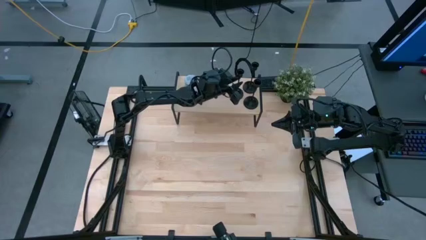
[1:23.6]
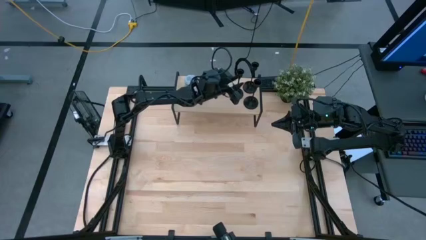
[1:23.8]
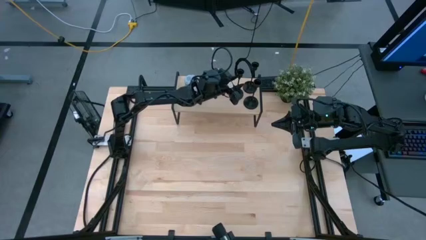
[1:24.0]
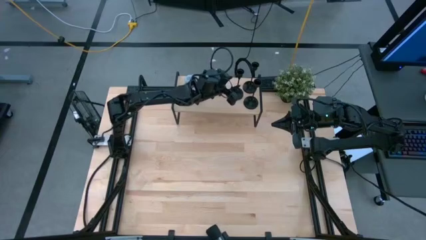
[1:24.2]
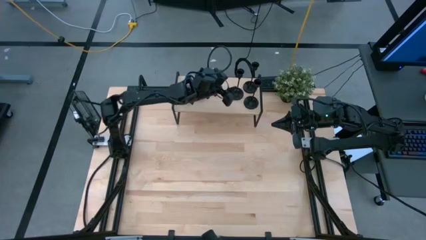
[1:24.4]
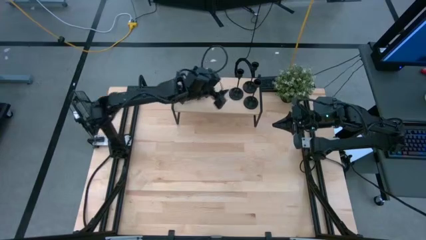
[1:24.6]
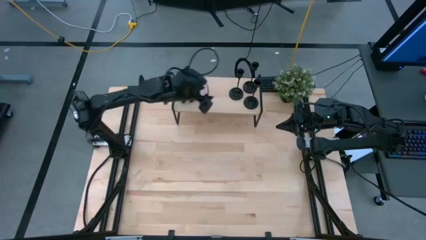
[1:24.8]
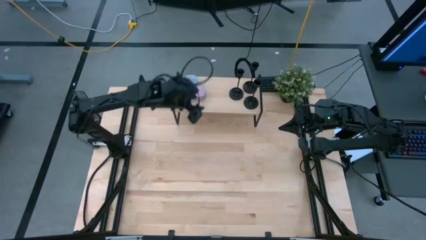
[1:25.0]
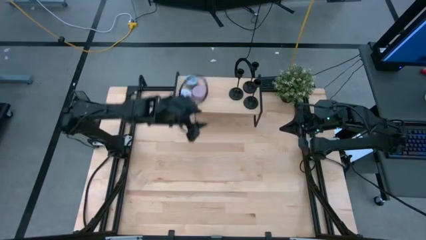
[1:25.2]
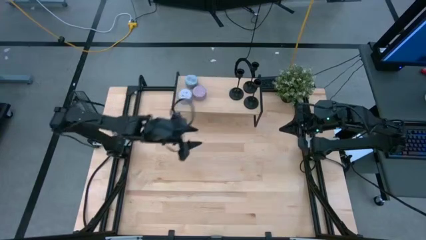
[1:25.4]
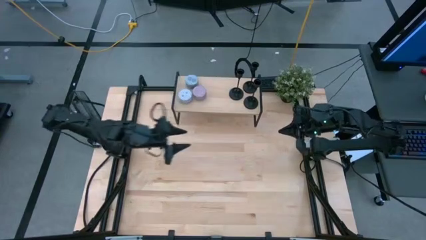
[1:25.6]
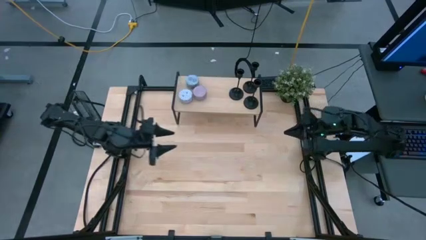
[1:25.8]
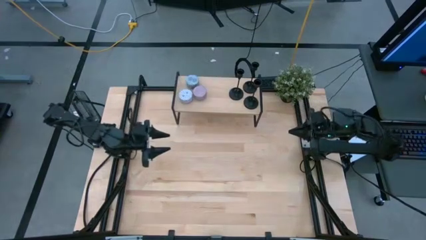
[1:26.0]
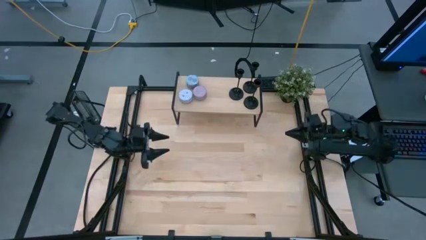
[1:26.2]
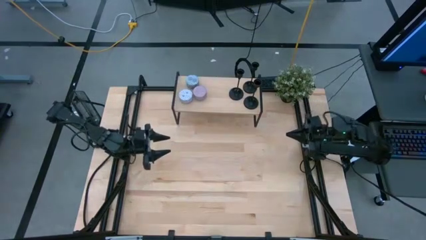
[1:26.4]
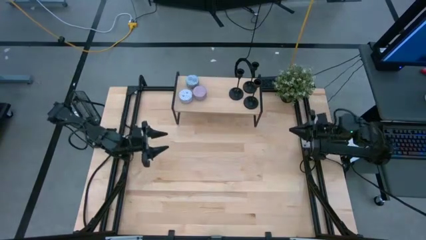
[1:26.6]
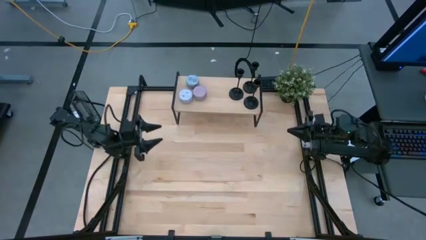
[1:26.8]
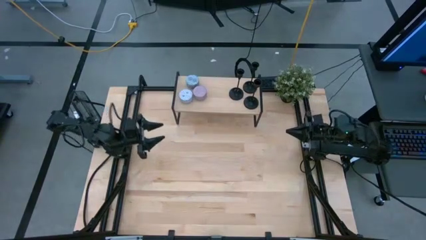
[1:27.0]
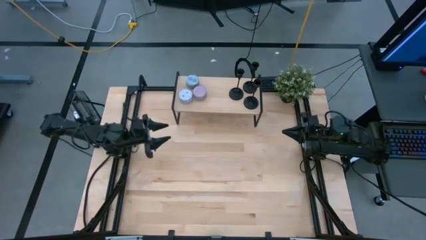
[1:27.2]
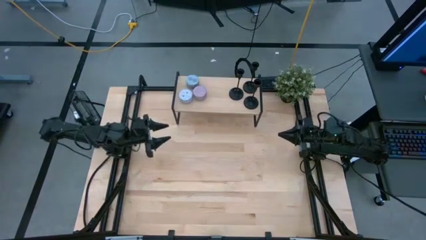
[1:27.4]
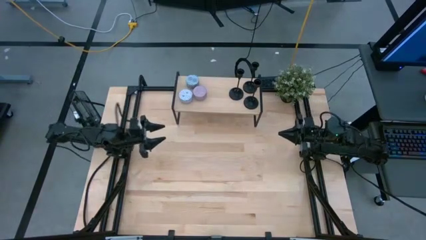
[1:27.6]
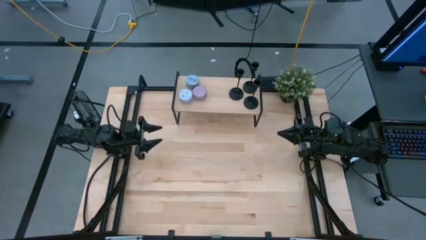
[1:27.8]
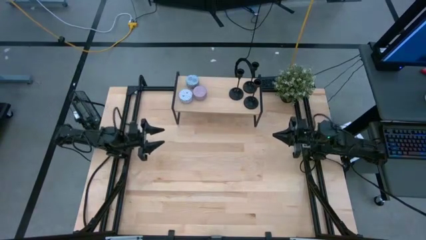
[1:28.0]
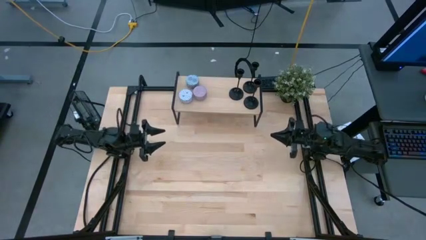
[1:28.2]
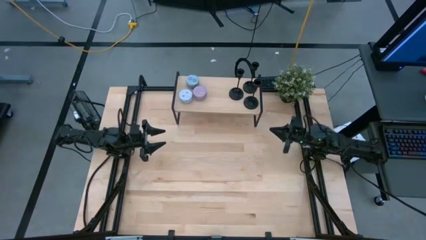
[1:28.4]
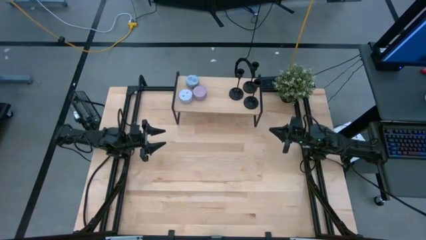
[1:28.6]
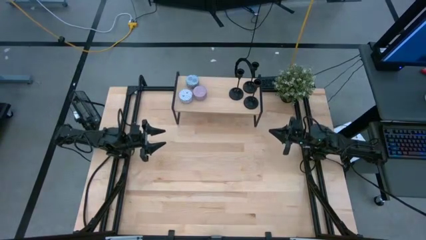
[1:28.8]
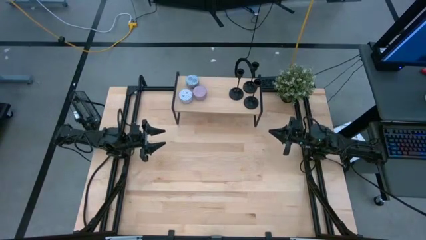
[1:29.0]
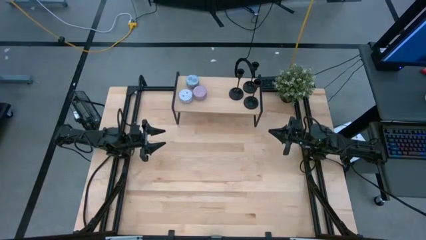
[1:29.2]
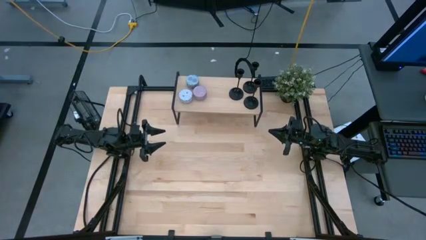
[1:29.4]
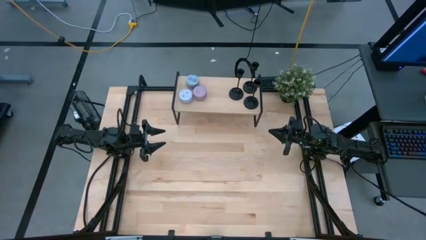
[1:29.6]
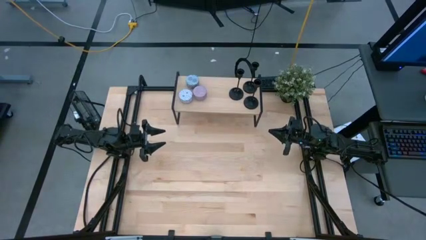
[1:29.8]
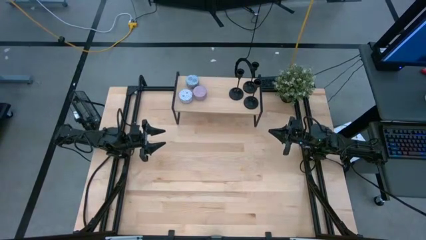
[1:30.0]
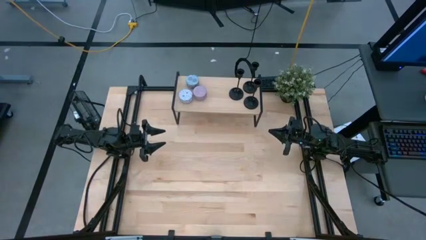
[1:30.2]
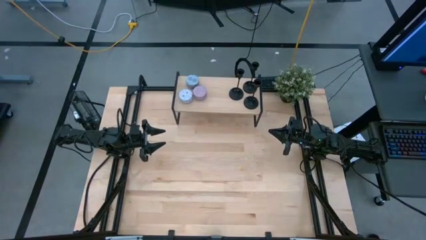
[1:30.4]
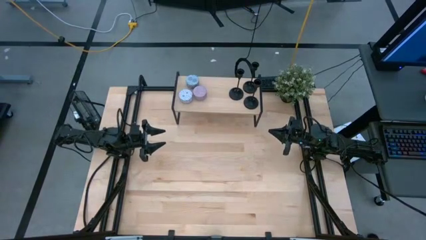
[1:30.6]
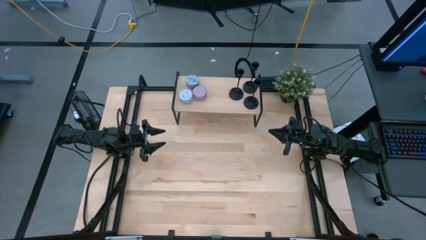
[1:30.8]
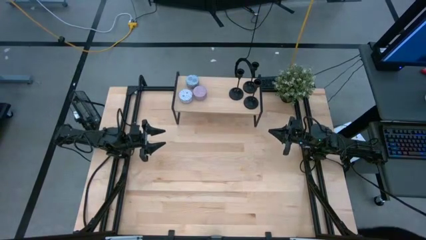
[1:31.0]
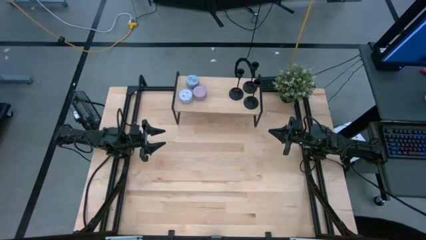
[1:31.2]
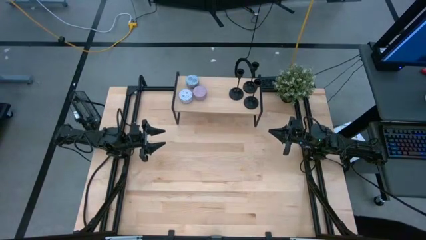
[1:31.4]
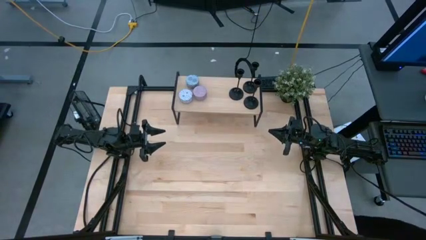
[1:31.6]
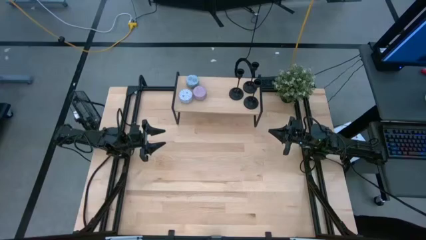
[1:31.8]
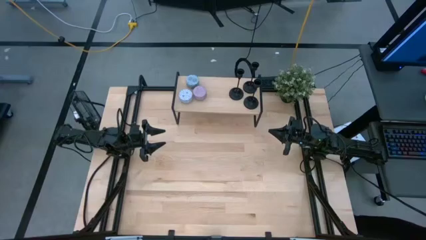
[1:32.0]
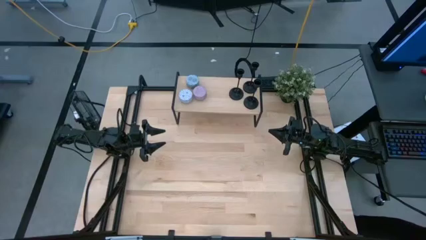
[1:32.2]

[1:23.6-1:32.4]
Task: Pick & Place candle stick holders
Return to Home Position

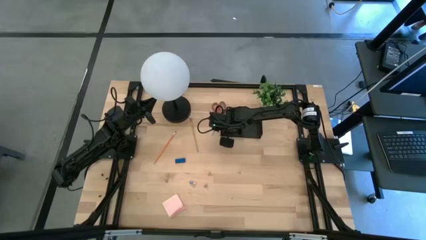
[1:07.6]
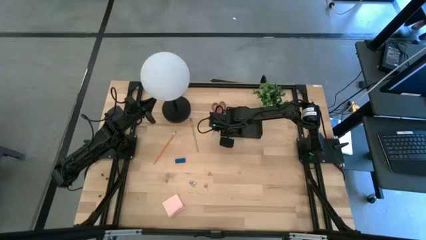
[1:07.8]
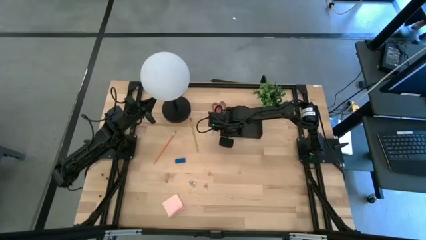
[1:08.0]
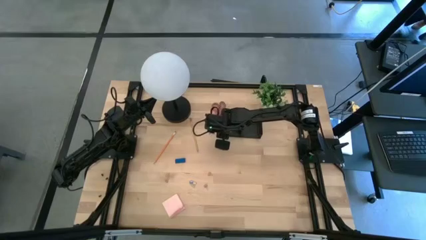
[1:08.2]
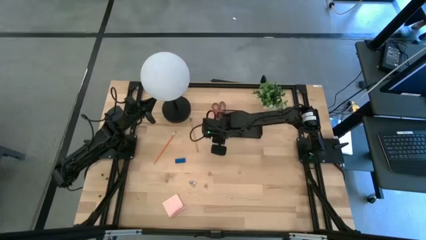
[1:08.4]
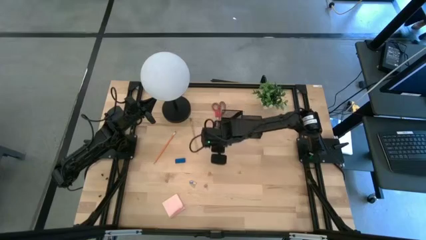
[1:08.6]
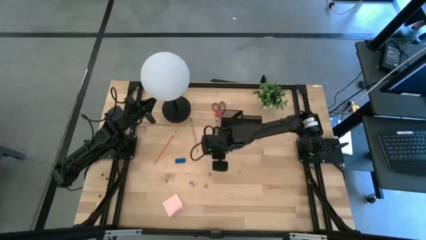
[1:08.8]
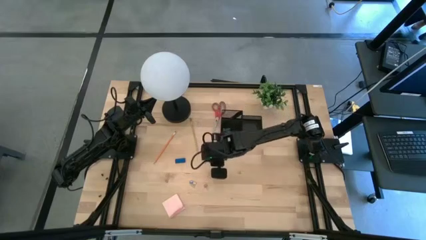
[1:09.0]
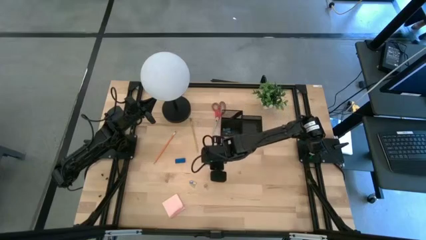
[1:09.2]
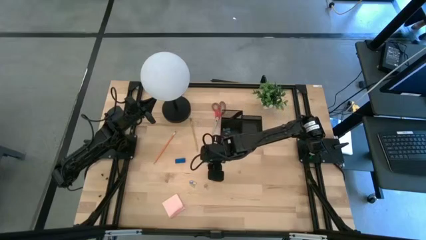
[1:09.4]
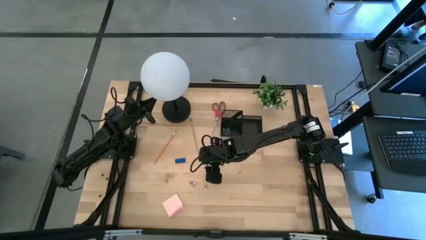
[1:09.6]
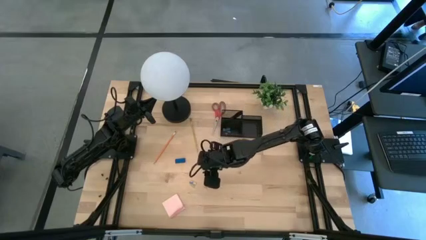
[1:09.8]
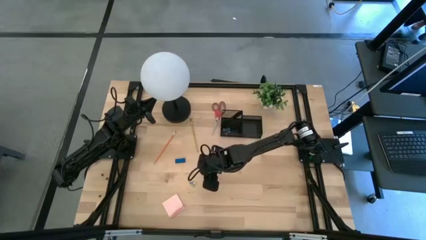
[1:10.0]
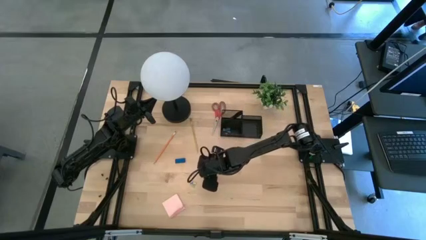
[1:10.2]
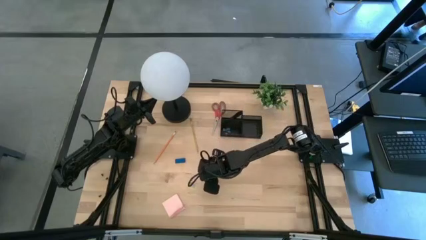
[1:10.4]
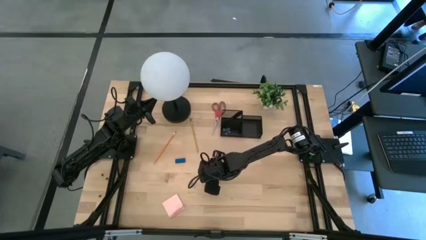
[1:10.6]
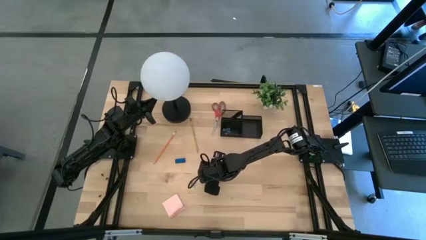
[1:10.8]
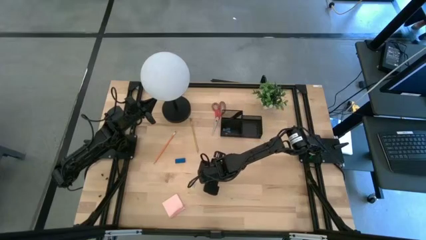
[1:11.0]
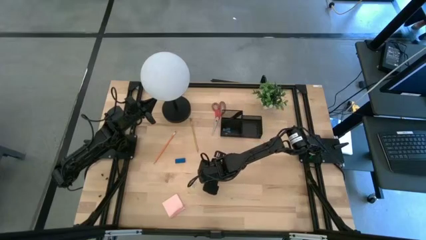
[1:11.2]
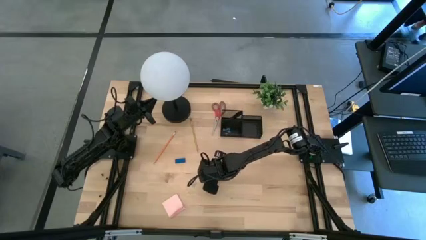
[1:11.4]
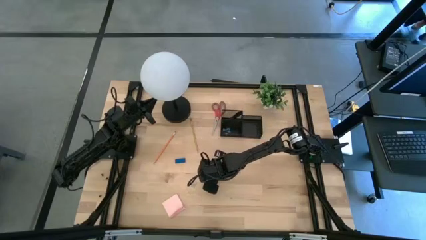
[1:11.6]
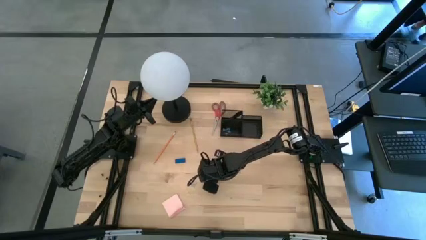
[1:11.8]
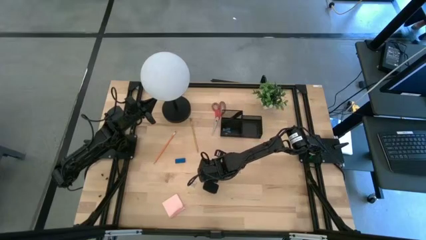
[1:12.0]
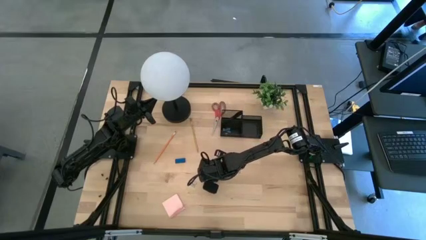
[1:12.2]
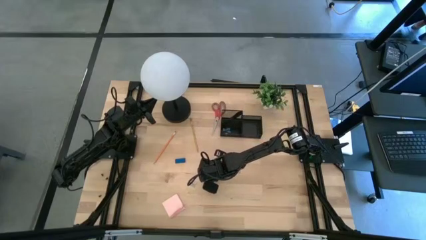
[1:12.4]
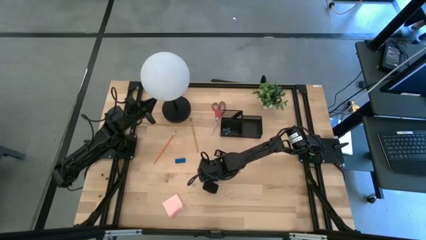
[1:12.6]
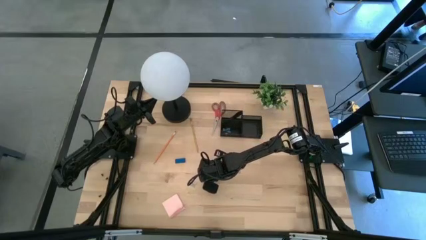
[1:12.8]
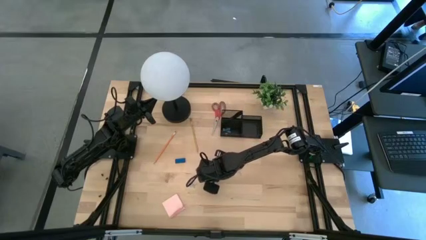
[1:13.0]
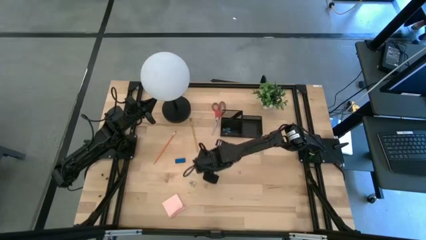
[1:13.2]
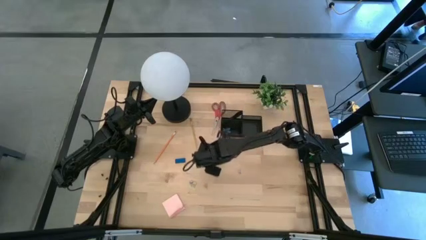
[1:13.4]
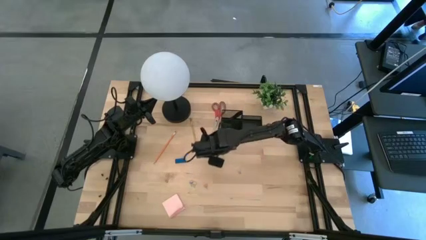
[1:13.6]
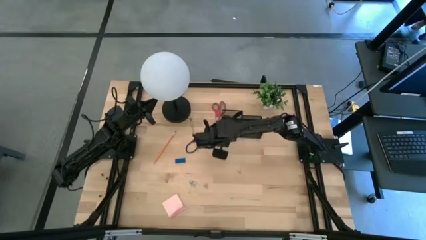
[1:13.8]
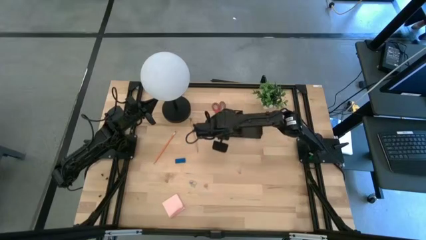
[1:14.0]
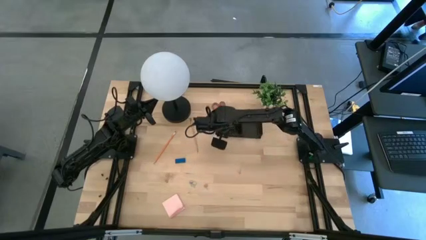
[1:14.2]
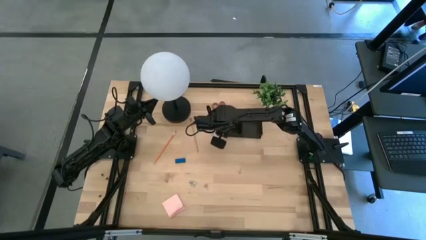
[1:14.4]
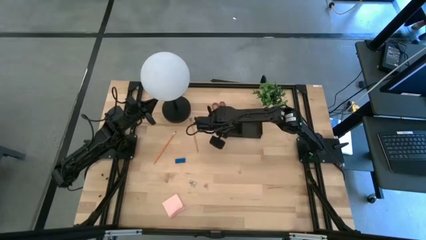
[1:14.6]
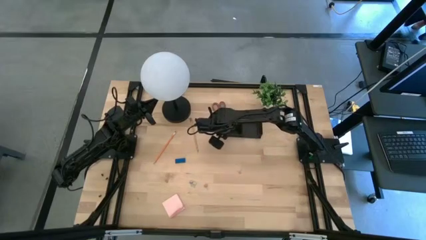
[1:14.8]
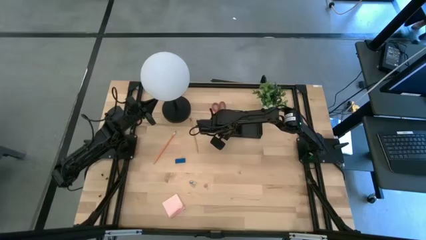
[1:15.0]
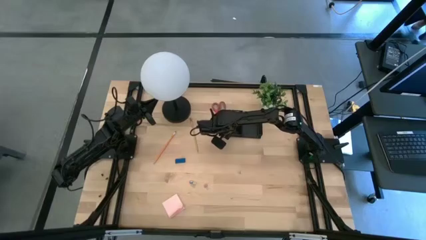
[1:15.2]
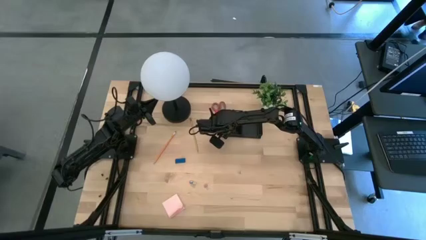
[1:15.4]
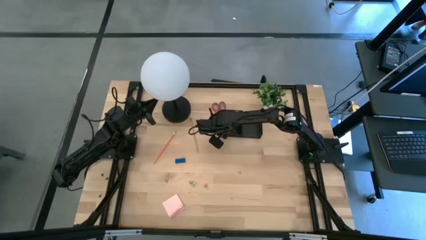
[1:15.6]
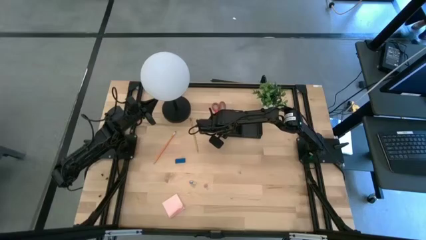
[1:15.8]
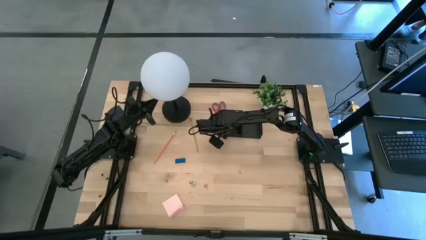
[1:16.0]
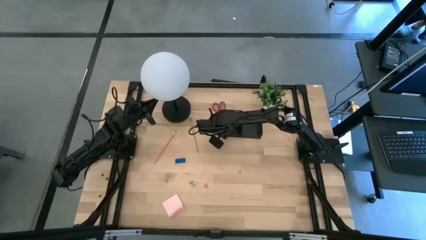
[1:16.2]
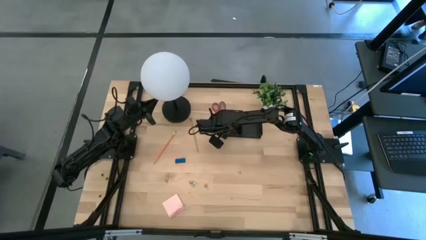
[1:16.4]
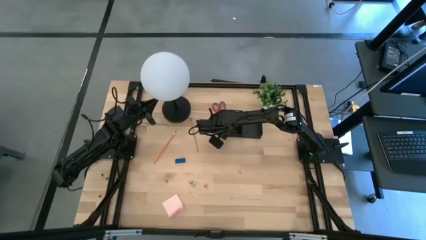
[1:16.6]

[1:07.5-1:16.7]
Task: Pick and place office supplies into organizer
Put the top pink clip binder into the black desk organizer
